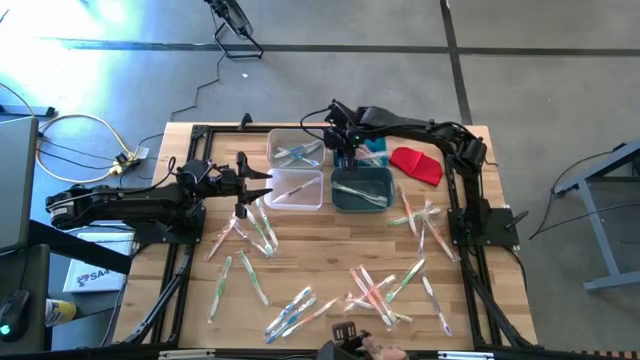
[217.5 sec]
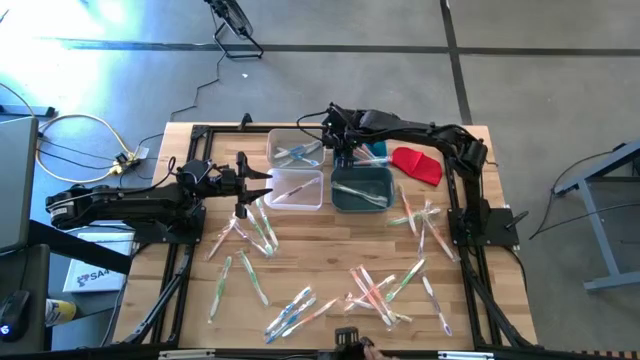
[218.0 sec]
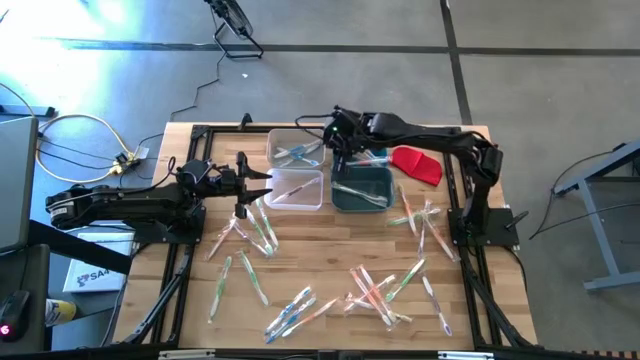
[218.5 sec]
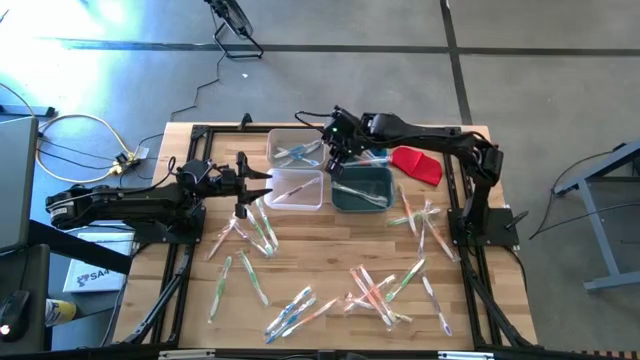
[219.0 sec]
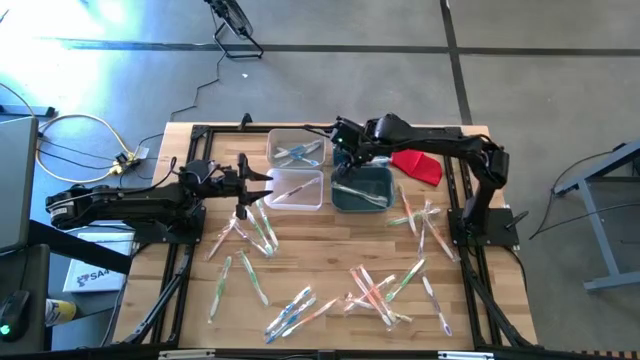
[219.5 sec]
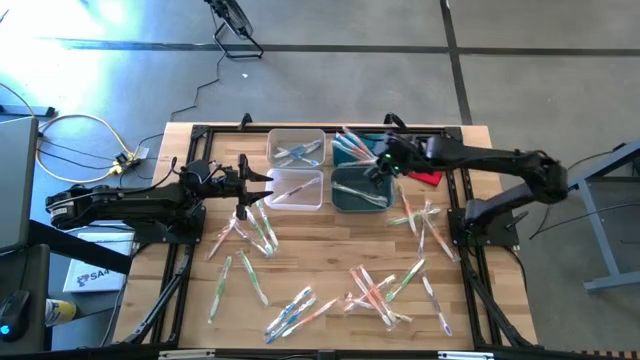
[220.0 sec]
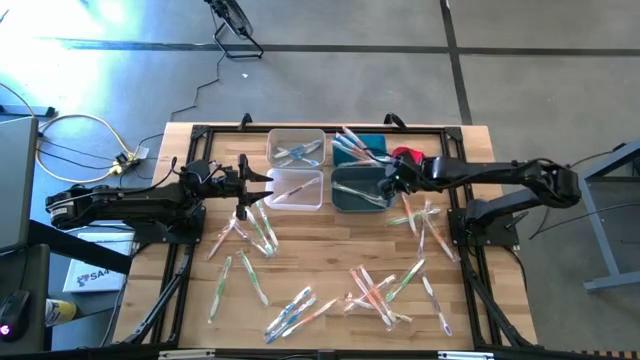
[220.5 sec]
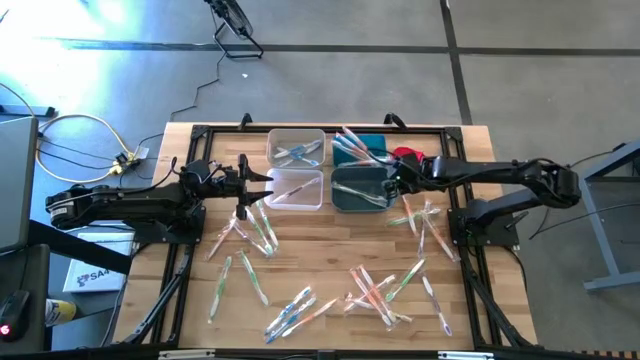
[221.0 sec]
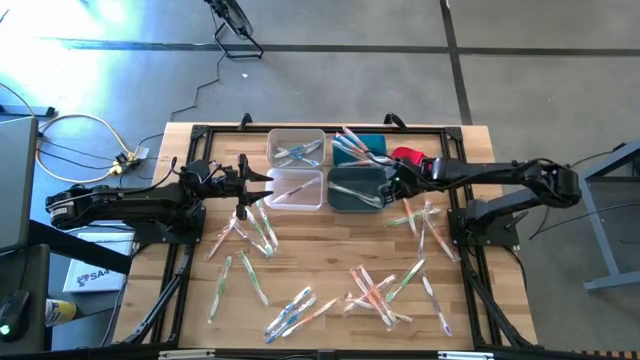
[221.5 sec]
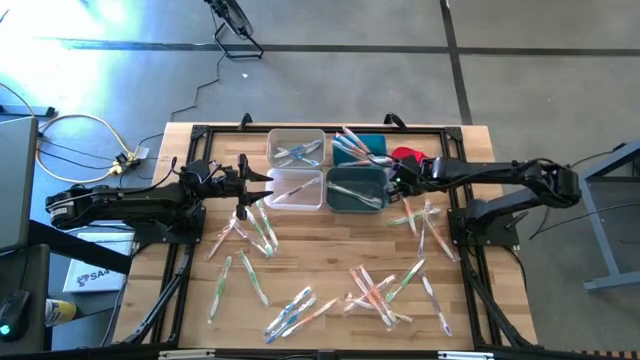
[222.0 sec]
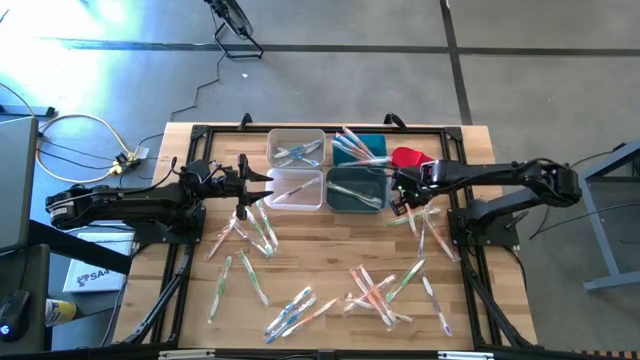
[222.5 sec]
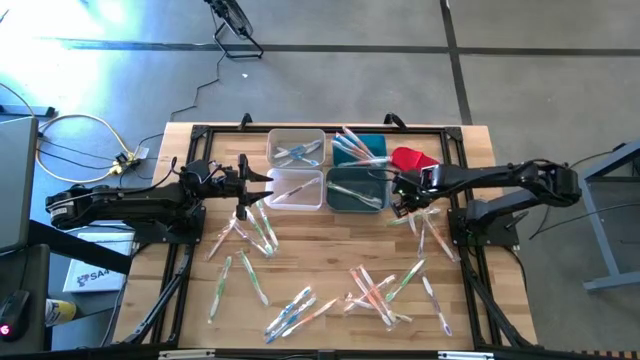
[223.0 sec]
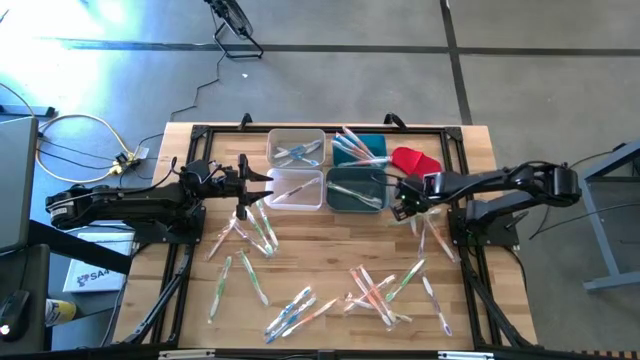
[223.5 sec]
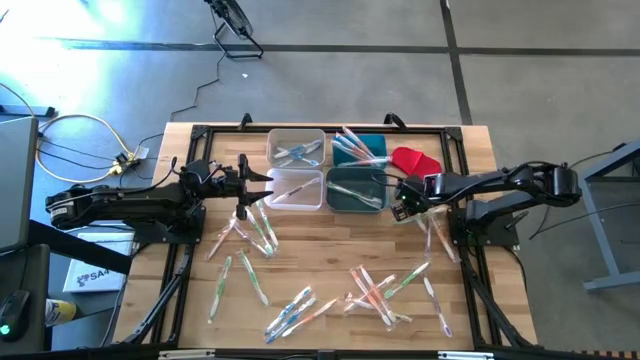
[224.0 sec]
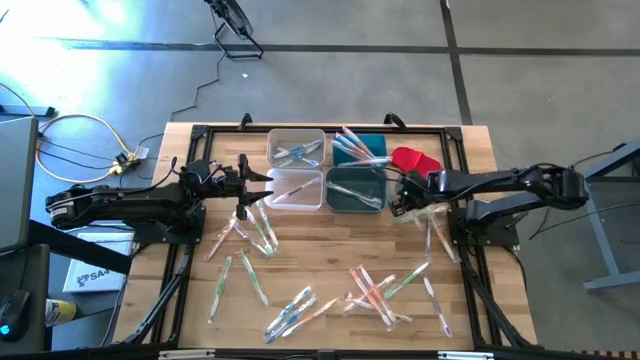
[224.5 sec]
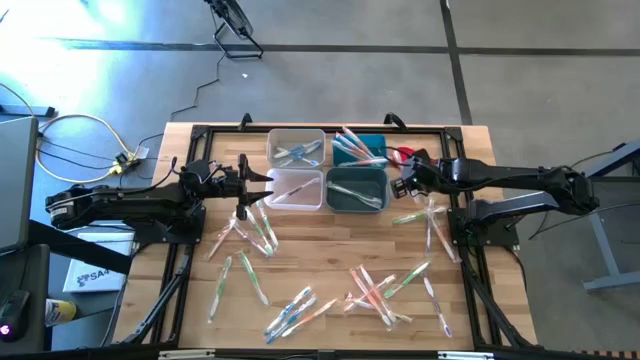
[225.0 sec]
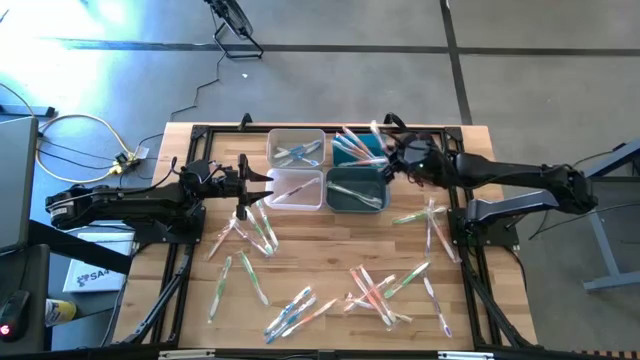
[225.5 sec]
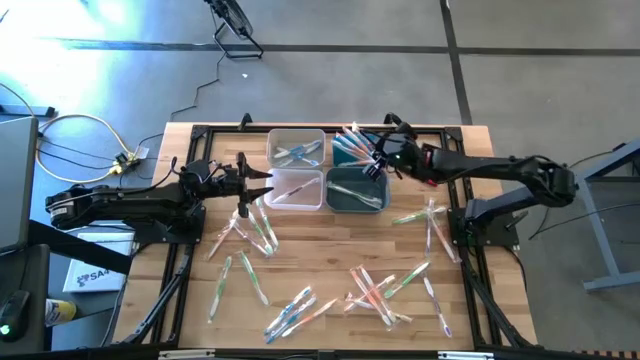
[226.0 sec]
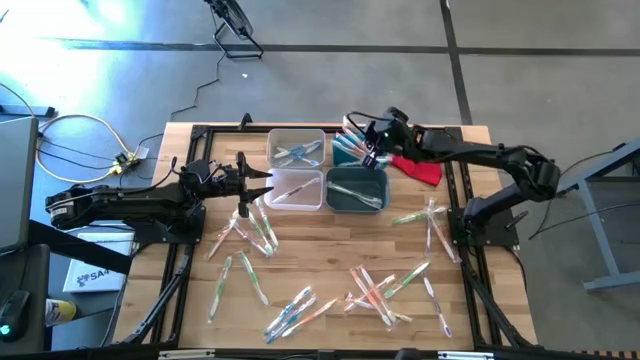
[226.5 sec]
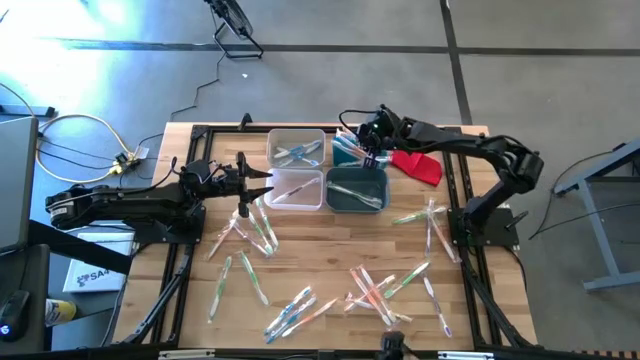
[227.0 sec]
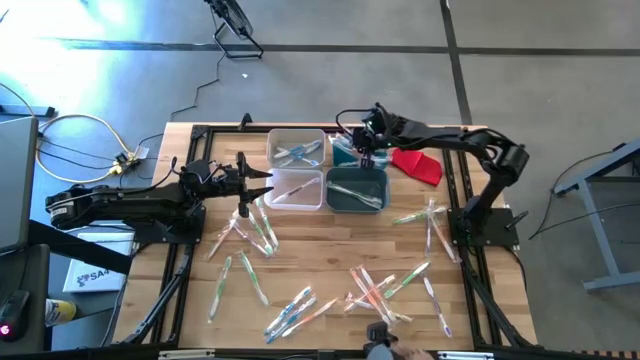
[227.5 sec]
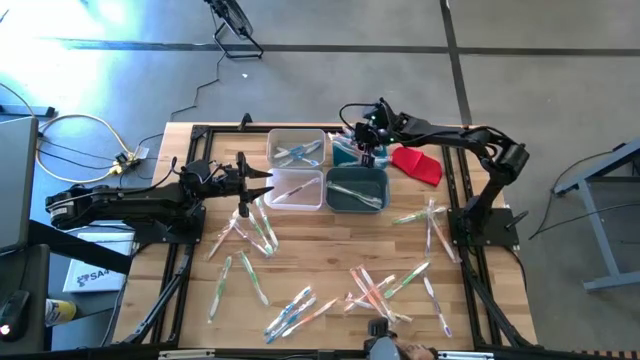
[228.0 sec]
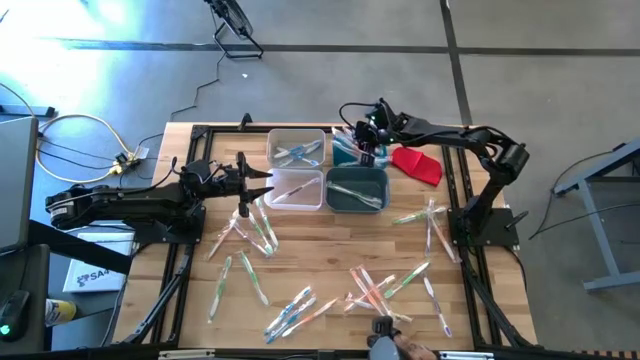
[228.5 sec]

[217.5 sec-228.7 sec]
Task: Pick & Place Toothbrushes
Put the orange toothbrush into the blue bin

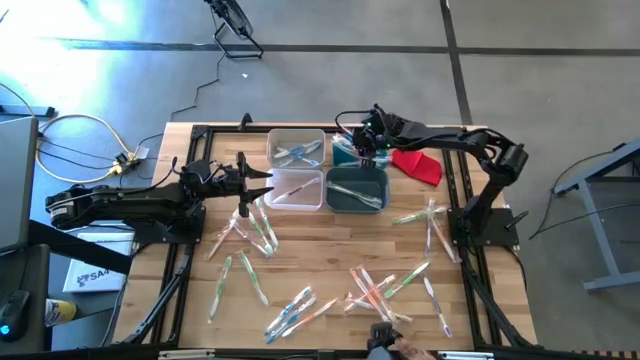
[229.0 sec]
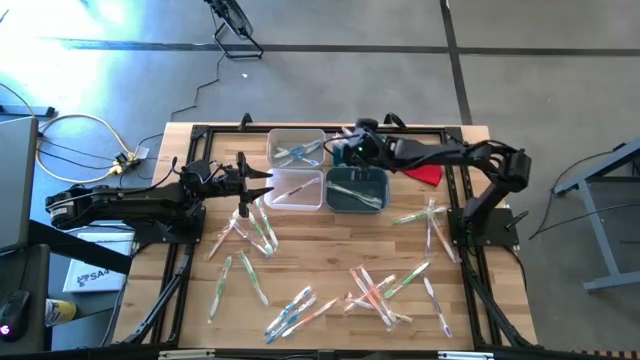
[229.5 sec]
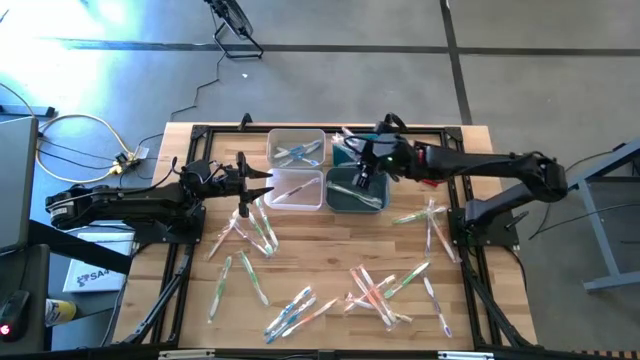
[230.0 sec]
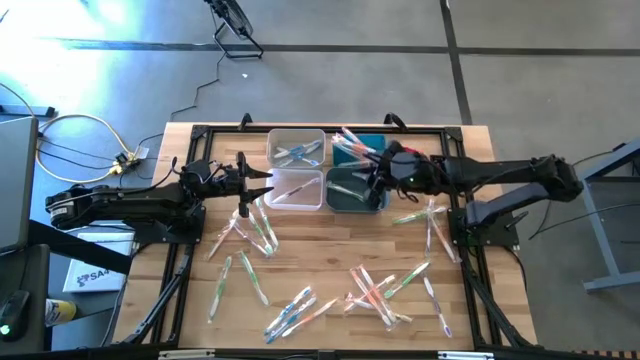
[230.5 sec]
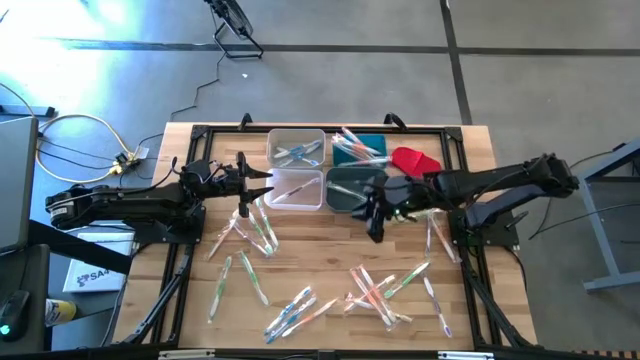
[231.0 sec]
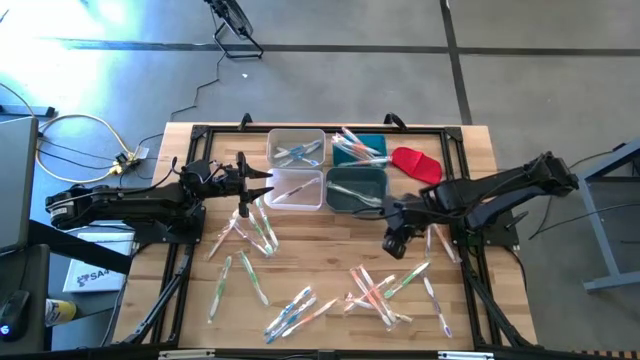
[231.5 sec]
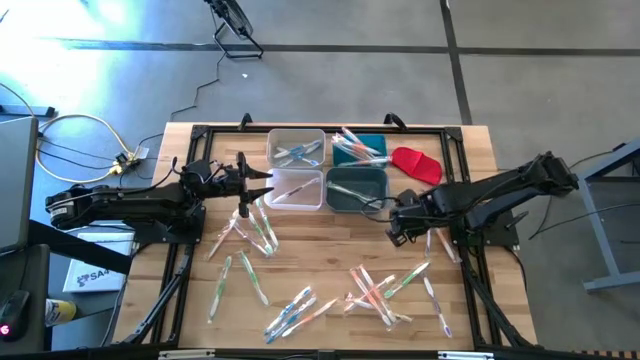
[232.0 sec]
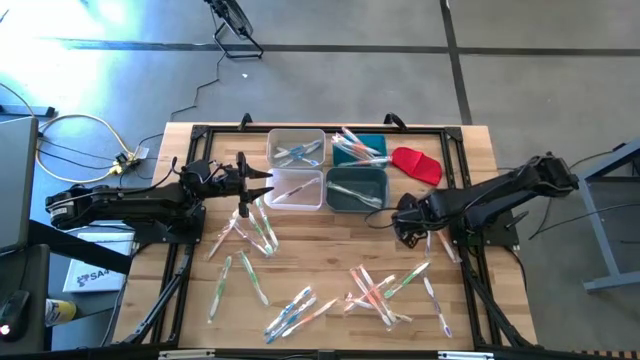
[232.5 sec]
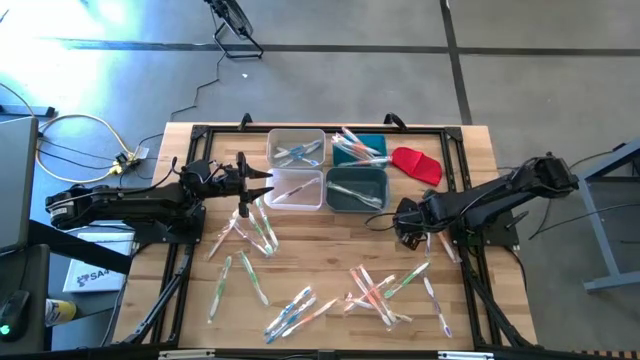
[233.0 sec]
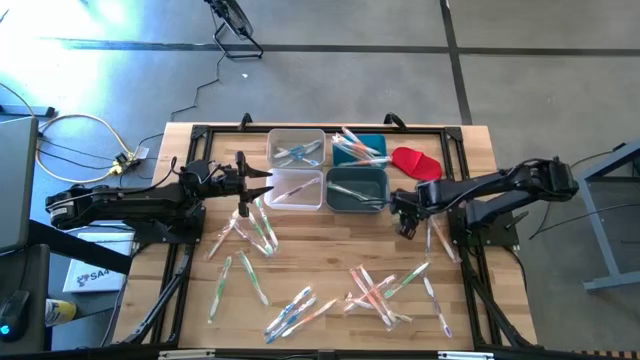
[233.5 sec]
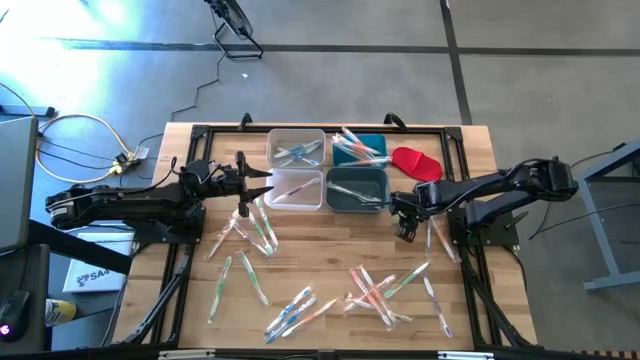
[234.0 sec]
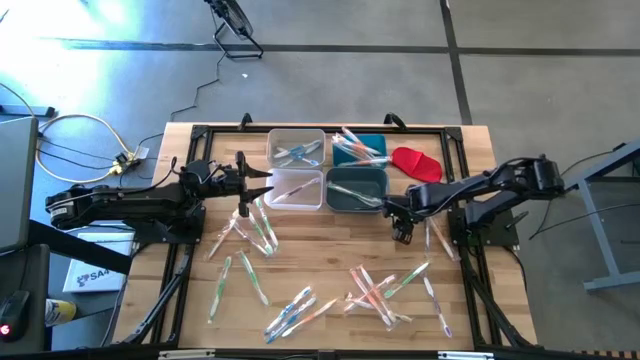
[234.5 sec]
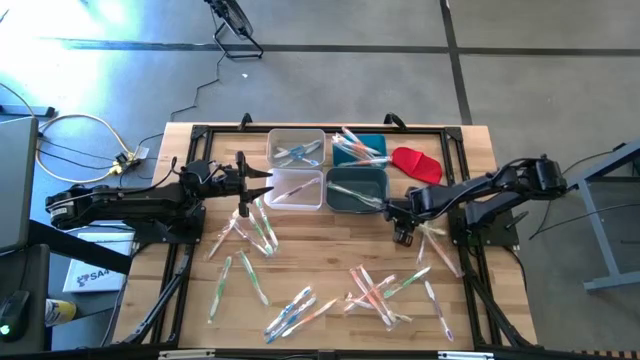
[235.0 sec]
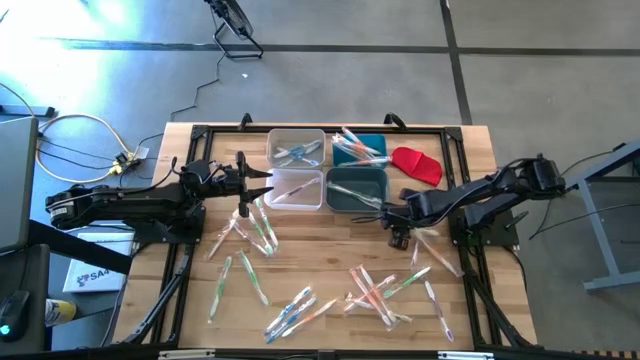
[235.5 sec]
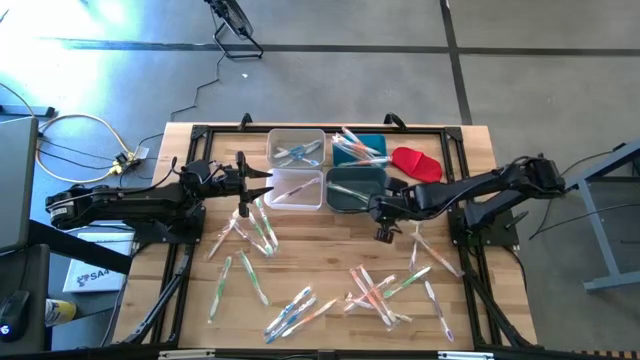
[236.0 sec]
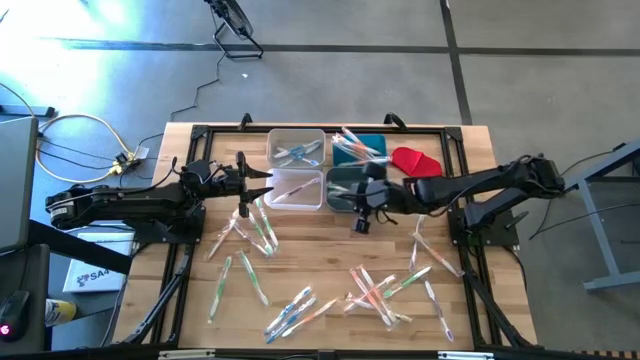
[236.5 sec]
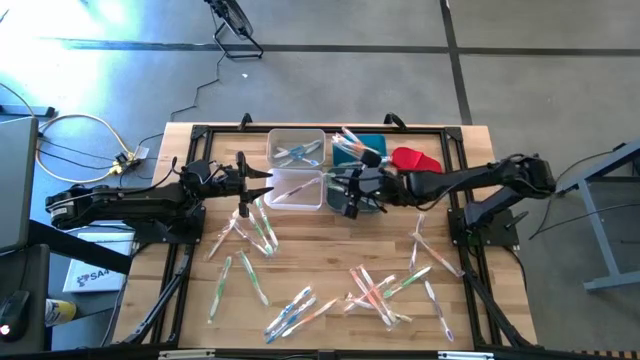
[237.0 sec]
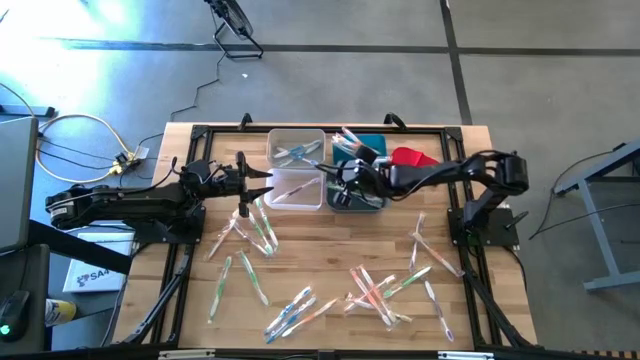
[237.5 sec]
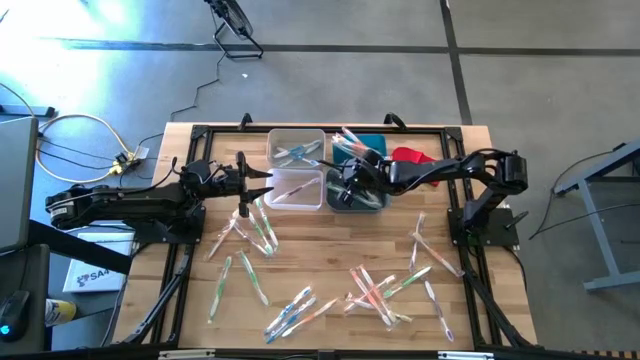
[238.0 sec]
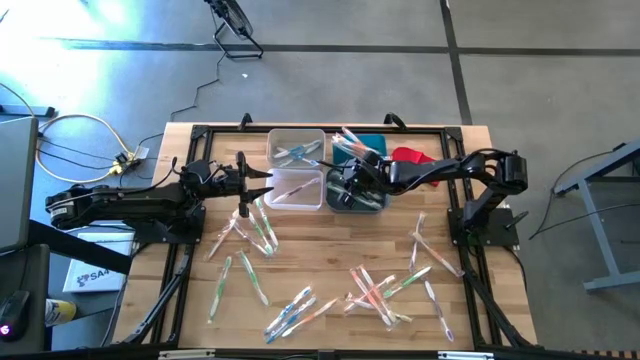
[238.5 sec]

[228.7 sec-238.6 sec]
Put the green toothbrush into the green bin
